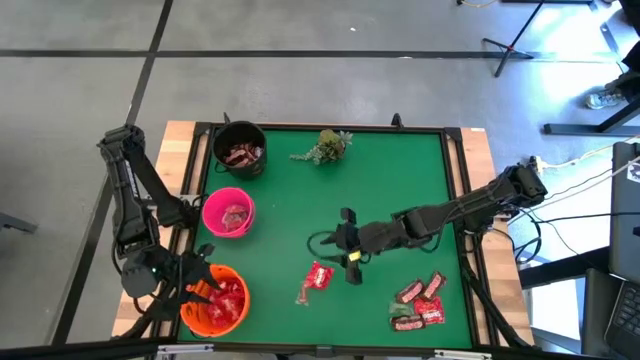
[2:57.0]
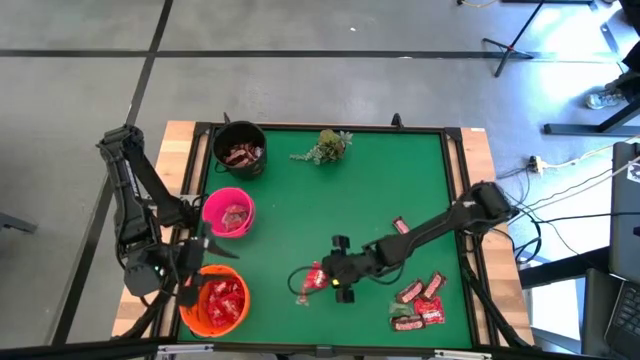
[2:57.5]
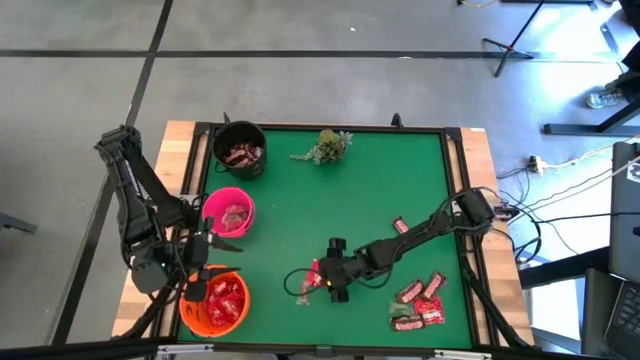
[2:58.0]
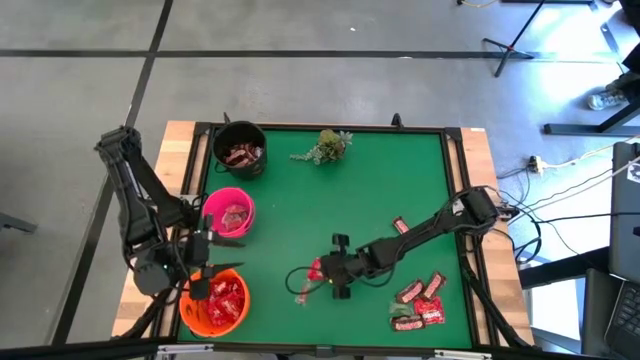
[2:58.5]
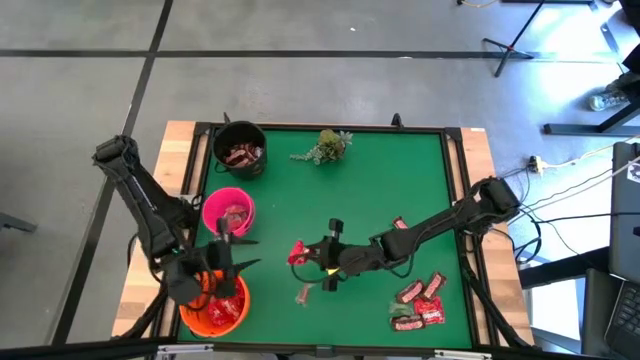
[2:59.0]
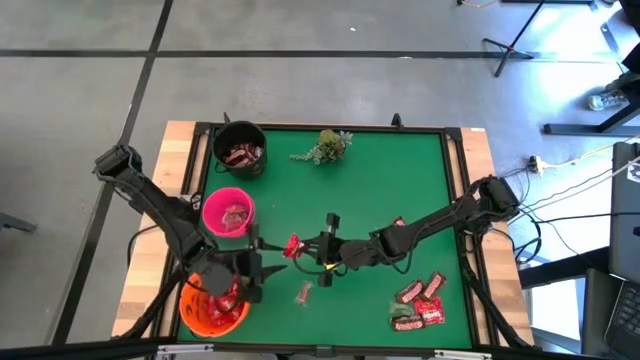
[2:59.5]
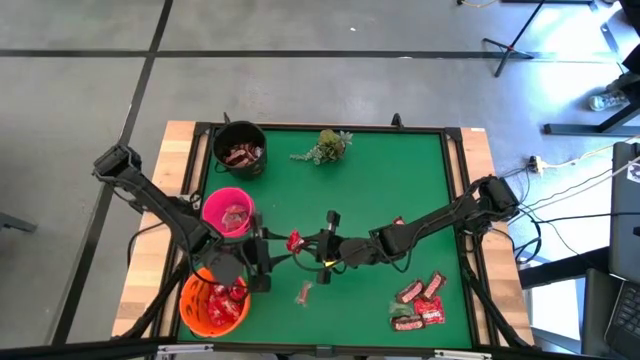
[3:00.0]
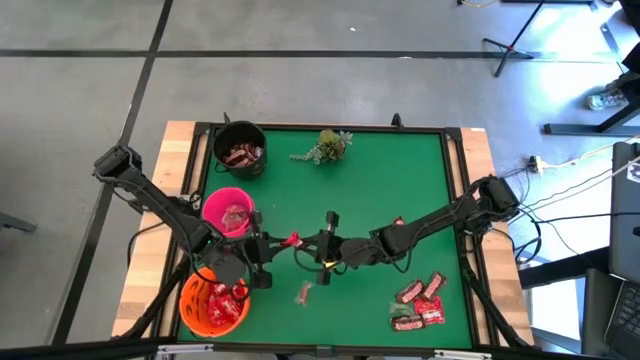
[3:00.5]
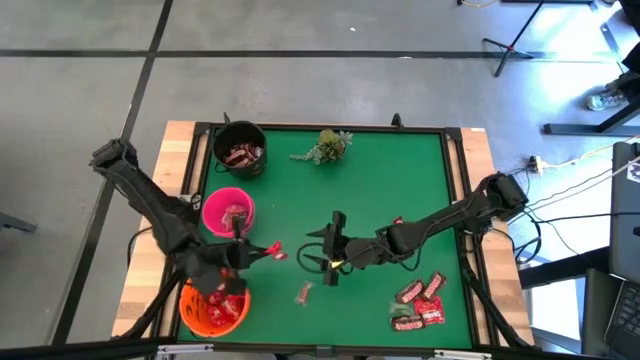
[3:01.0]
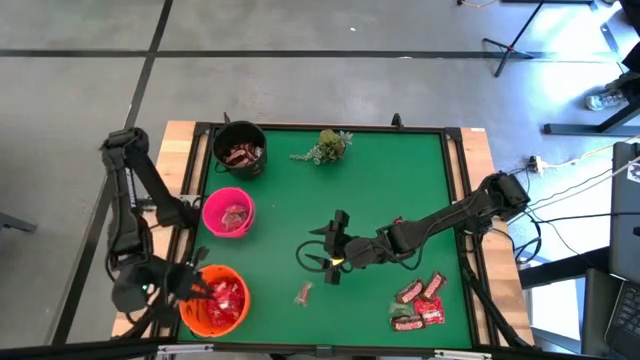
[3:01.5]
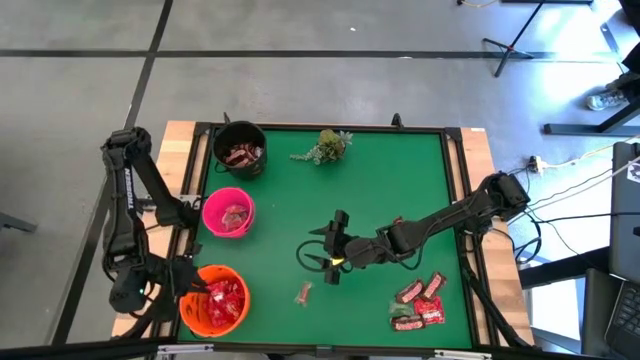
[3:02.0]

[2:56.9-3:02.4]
Task: Sort candy
Put the red candy into the orange bucket

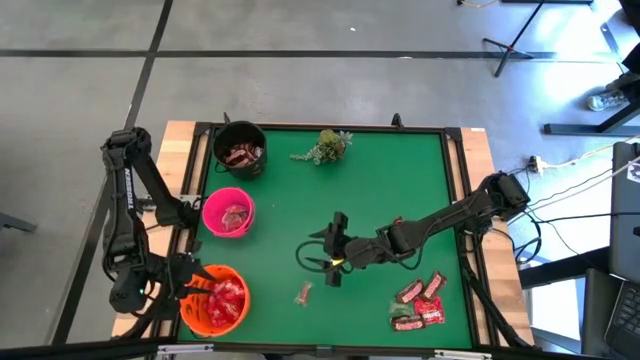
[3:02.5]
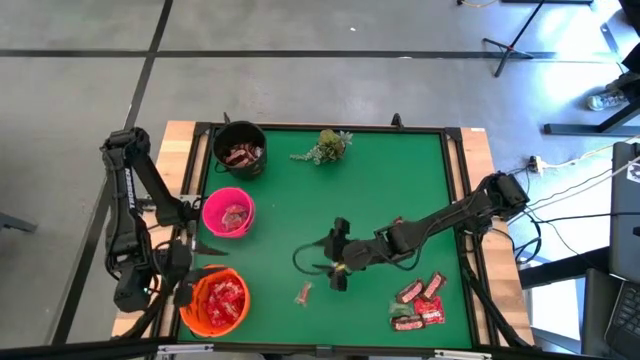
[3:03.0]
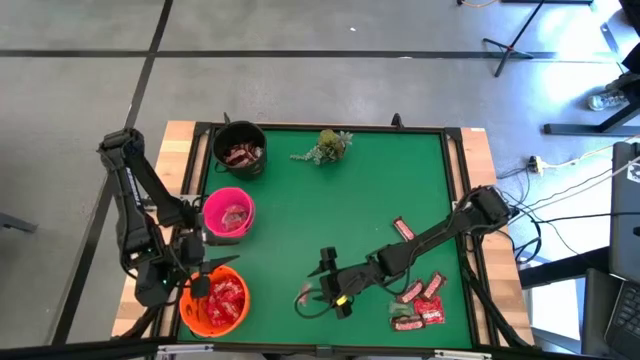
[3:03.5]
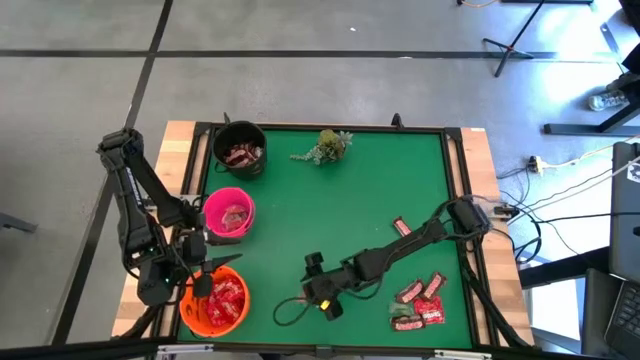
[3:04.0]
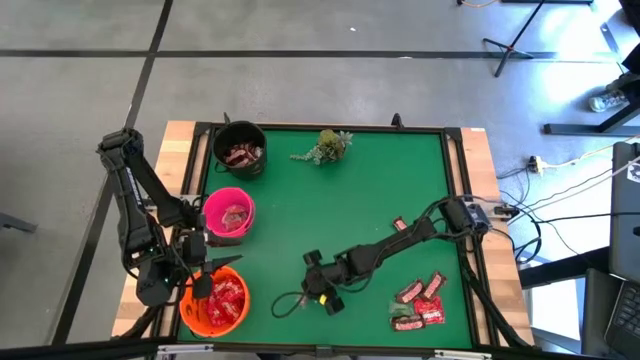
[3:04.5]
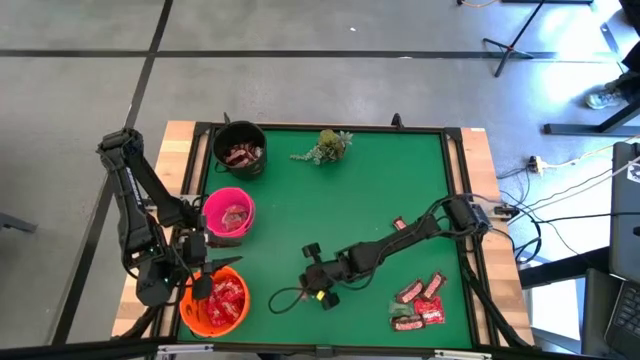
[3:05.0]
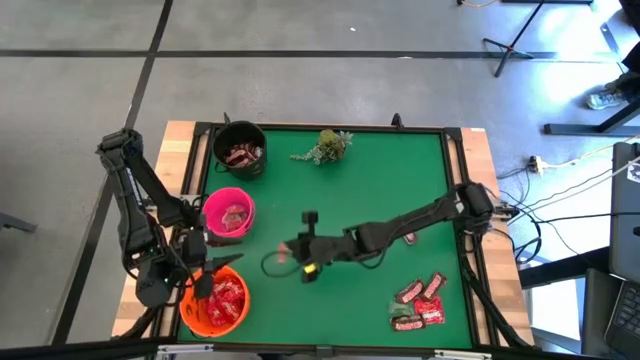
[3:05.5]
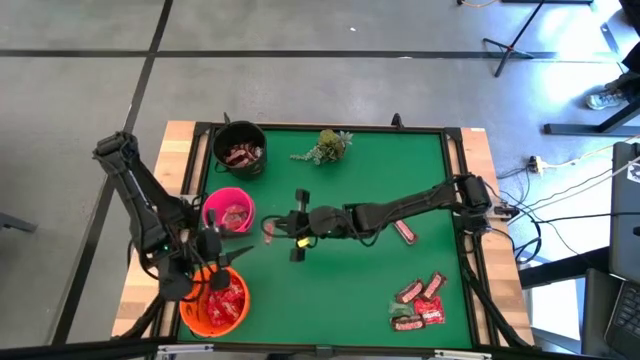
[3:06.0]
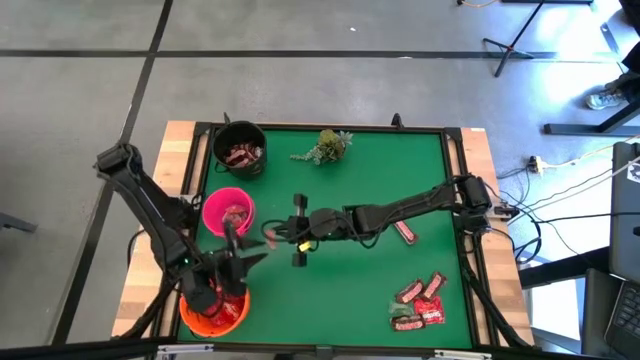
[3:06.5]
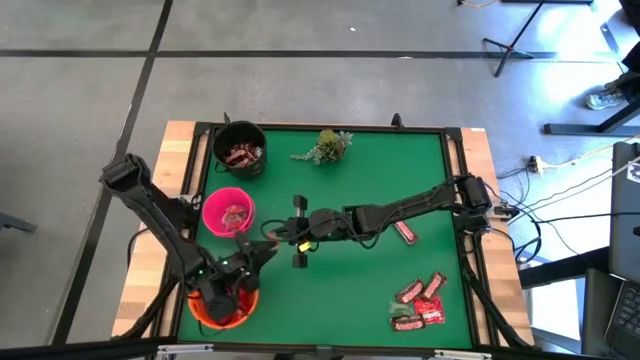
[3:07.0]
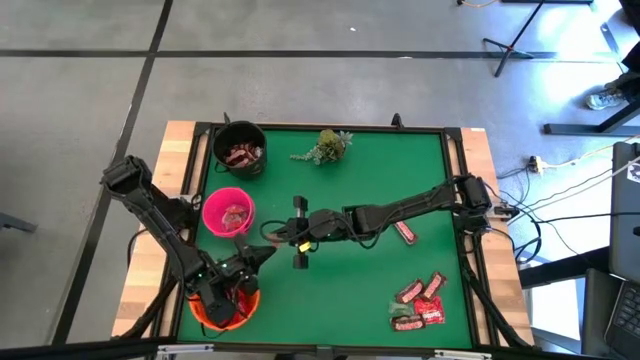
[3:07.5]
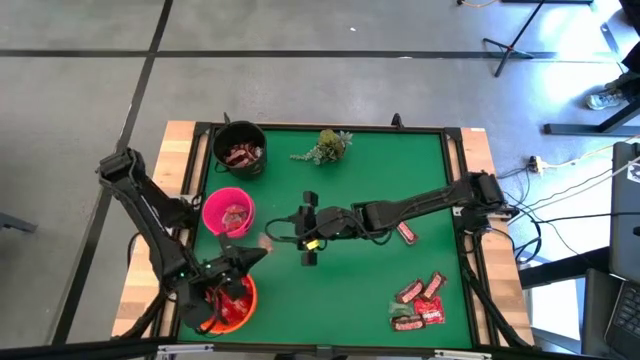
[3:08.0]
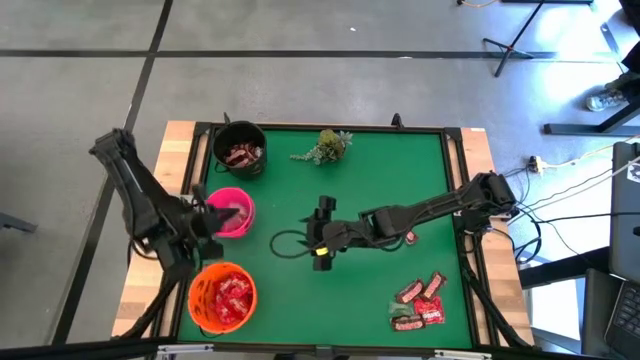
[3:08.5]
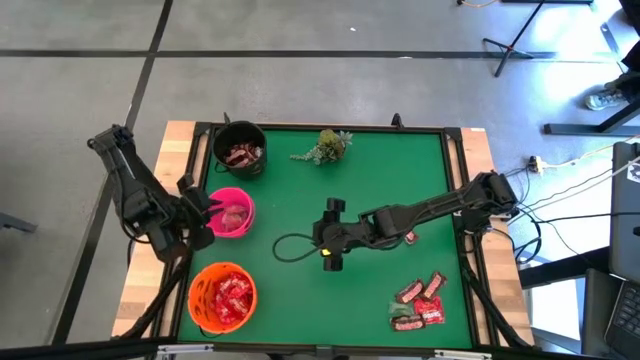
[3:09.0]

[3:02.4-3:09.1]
Put the orange gummy into the pink bucket

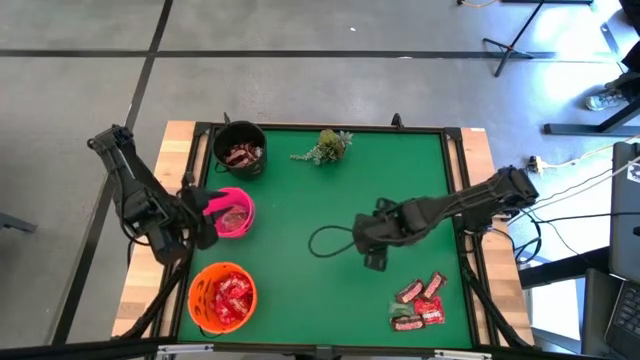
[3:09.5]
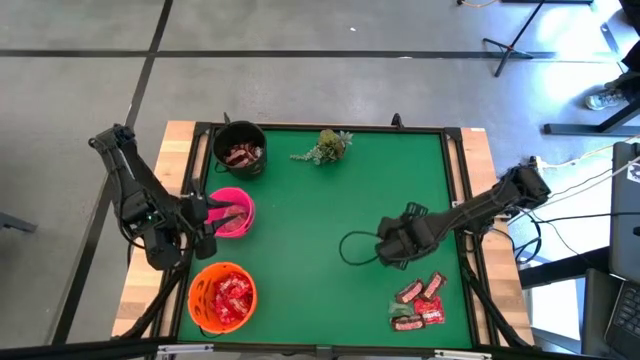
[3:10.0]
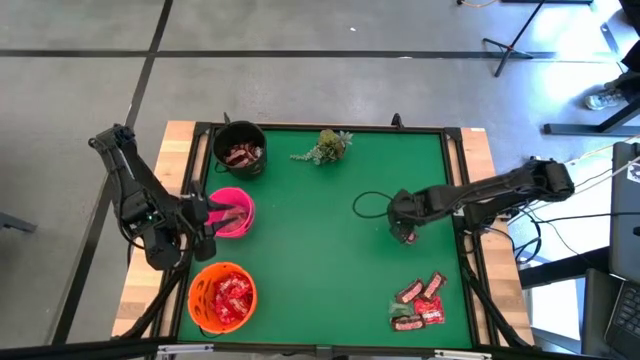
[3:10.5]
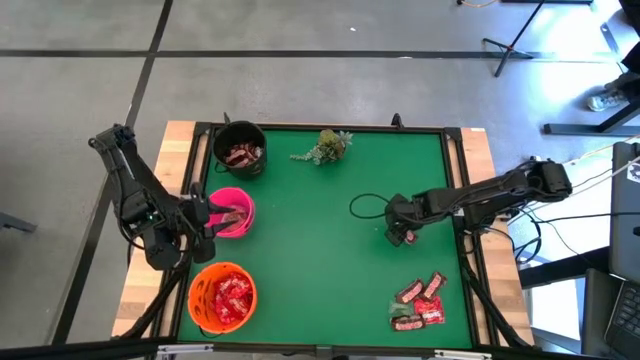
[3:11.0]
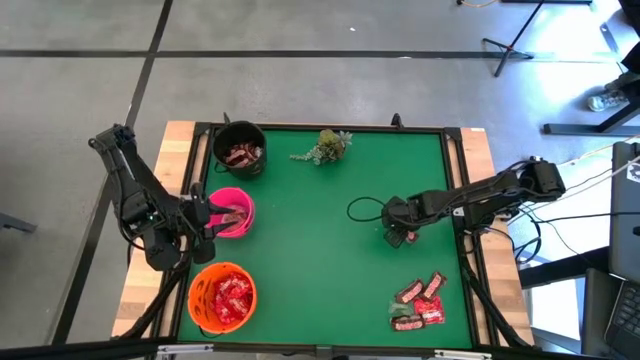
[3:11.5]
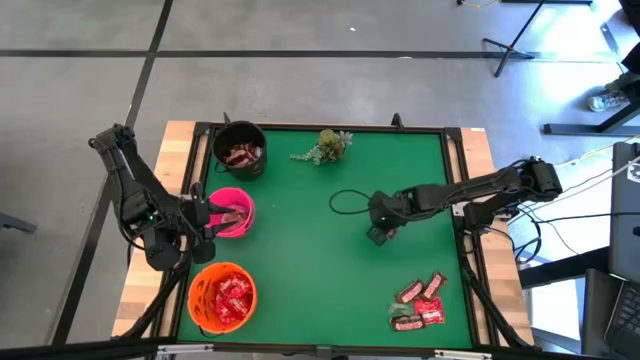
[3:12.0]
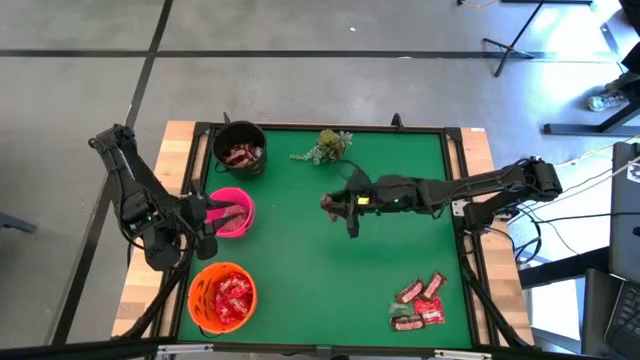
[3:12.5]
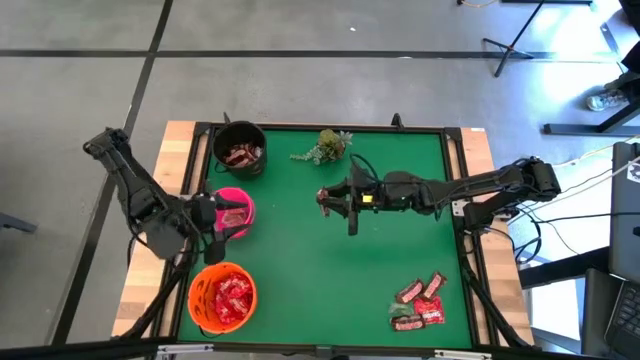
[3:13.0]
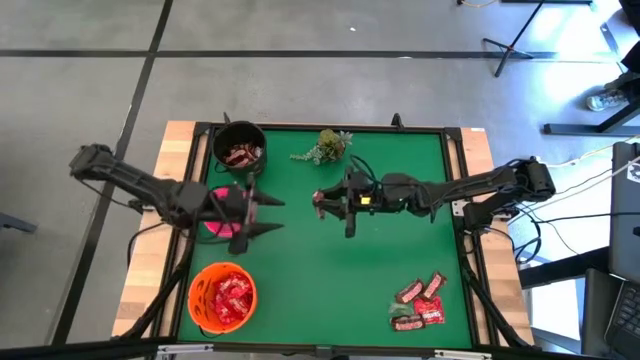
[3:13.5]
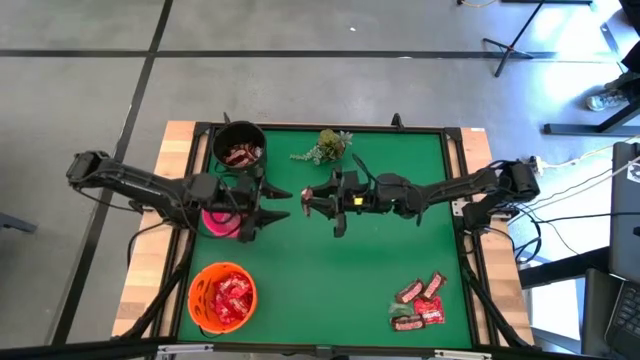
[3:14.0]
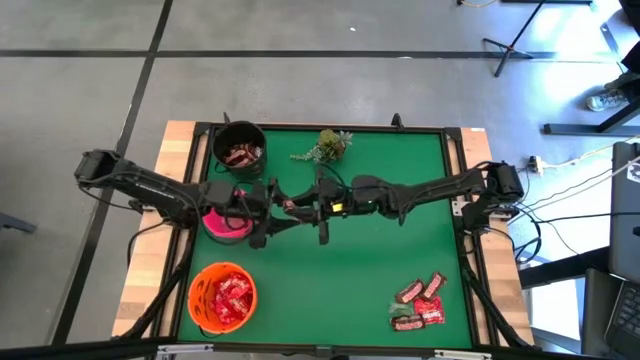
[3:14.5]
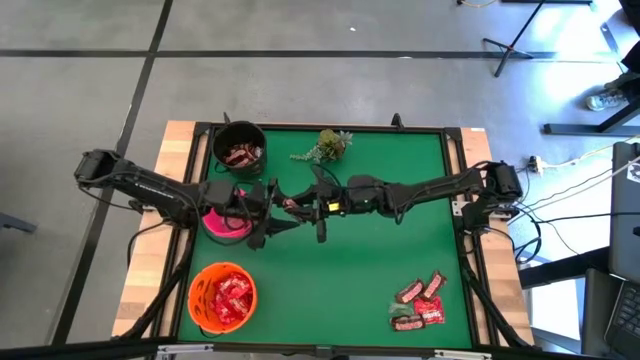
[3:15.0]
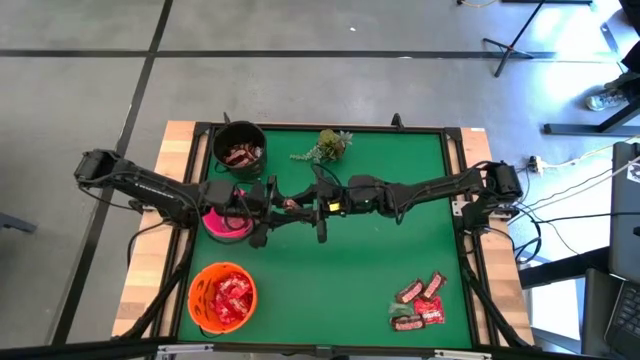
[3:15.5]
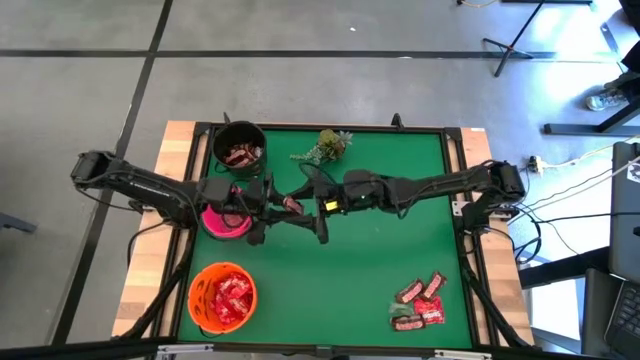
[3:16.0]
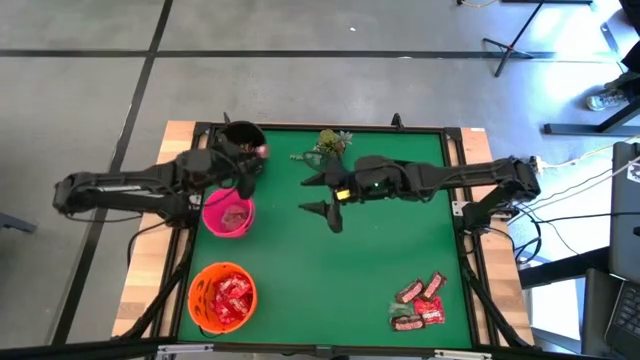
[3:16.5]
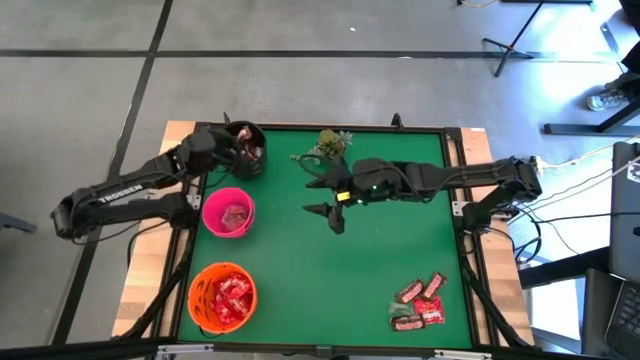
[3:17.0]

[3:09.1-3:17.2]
Put the brown chocolate into the black bucket
